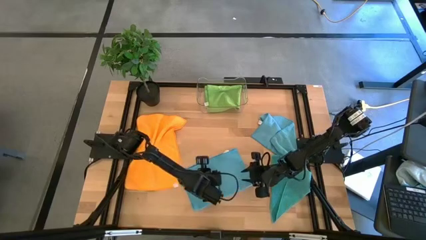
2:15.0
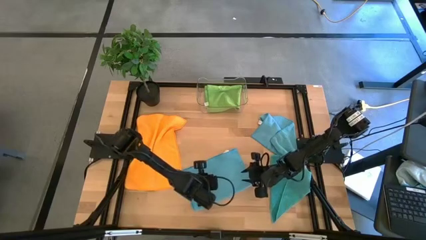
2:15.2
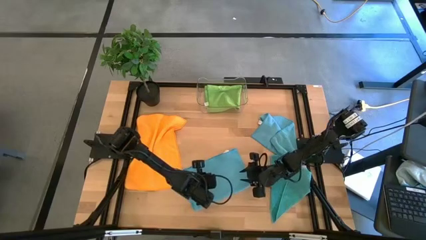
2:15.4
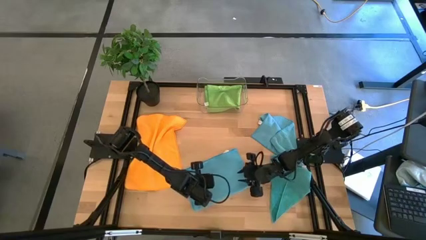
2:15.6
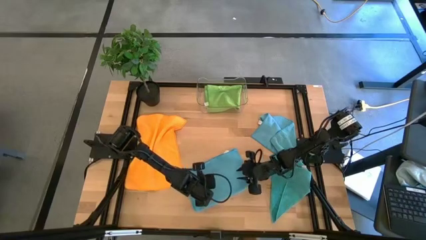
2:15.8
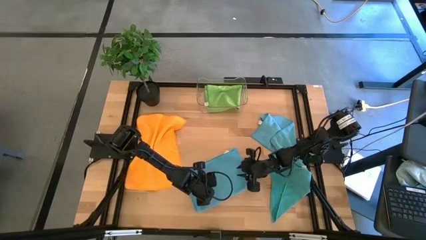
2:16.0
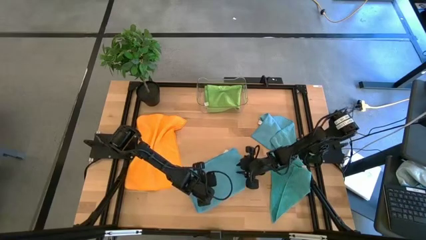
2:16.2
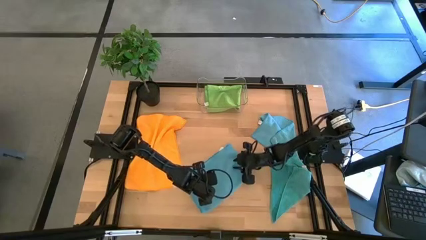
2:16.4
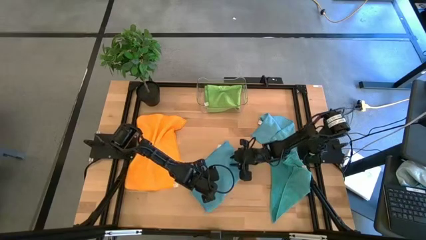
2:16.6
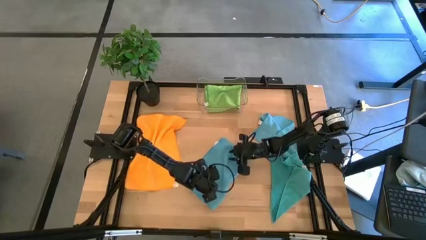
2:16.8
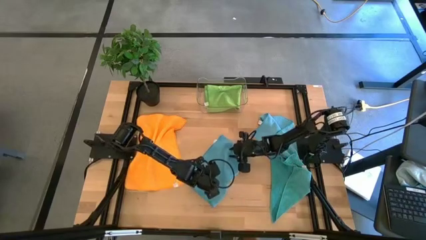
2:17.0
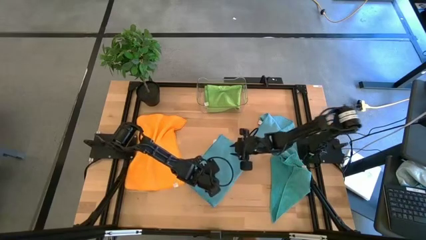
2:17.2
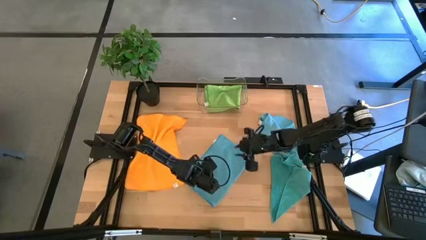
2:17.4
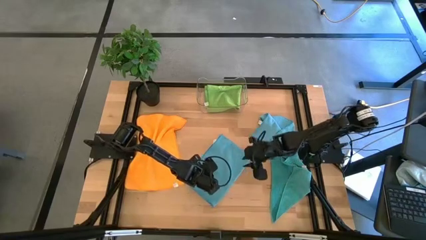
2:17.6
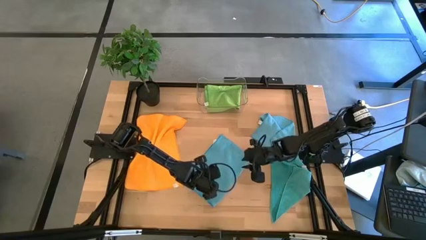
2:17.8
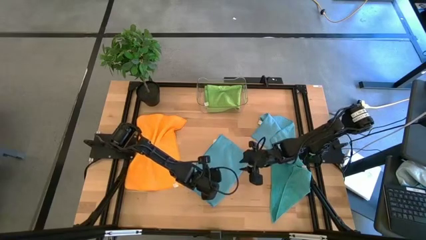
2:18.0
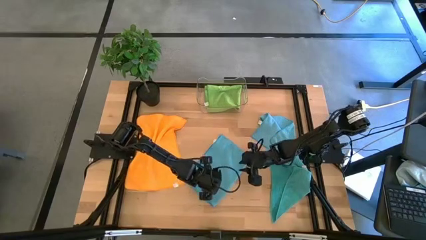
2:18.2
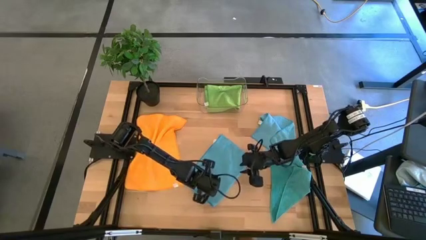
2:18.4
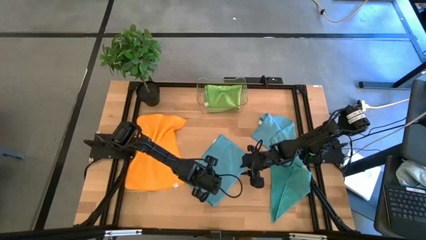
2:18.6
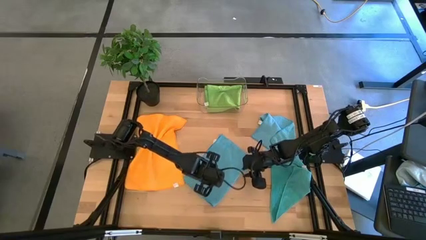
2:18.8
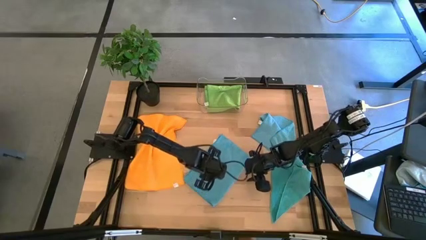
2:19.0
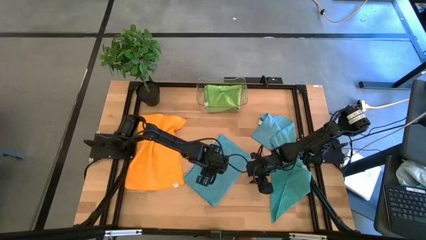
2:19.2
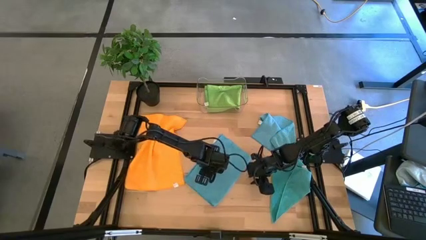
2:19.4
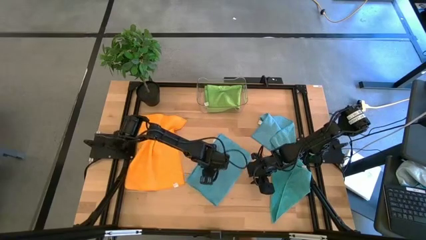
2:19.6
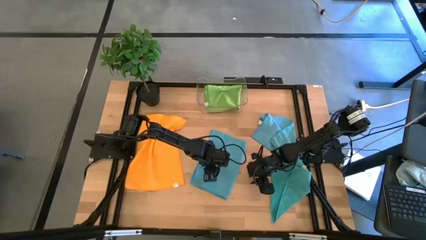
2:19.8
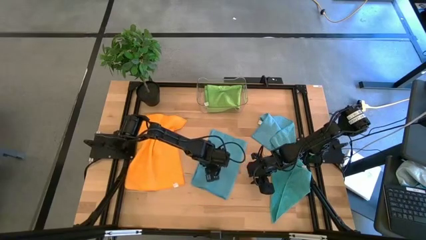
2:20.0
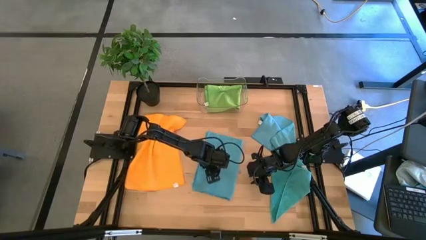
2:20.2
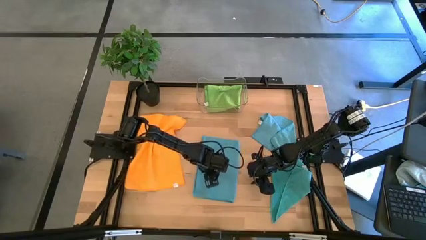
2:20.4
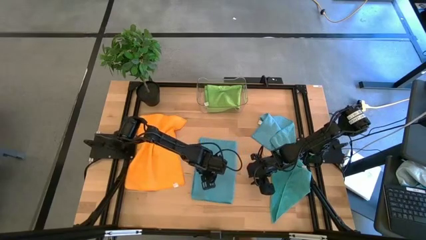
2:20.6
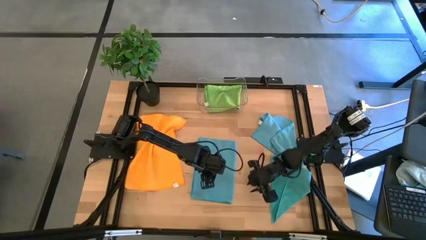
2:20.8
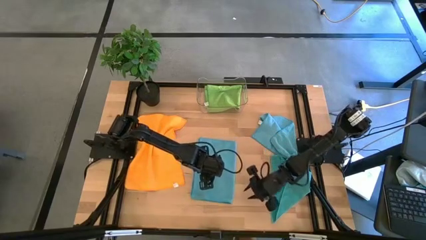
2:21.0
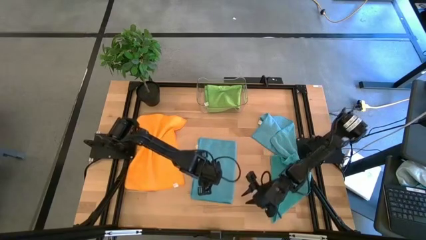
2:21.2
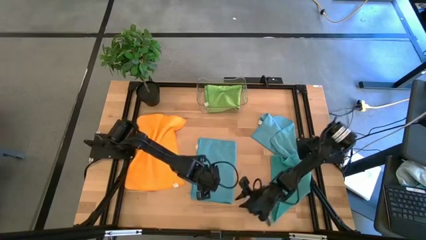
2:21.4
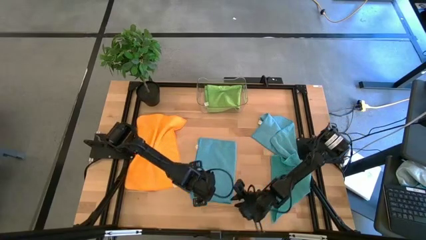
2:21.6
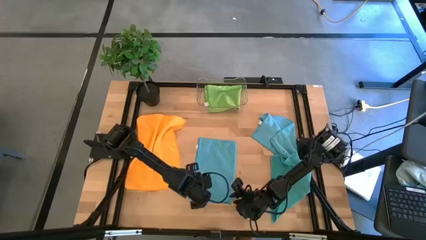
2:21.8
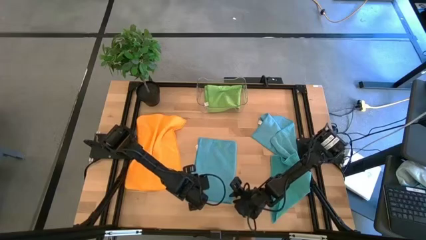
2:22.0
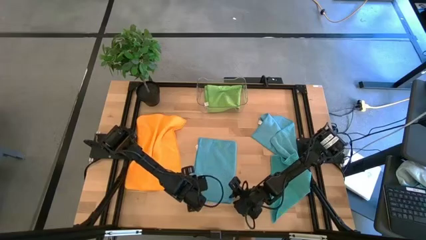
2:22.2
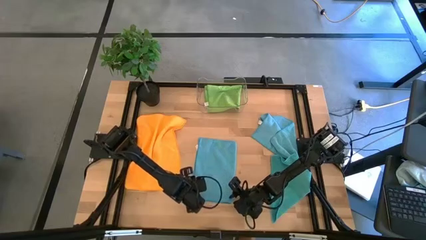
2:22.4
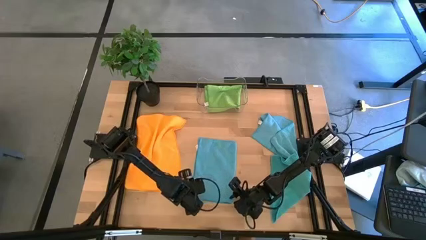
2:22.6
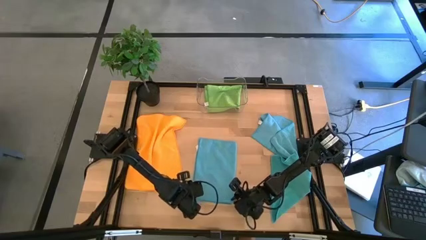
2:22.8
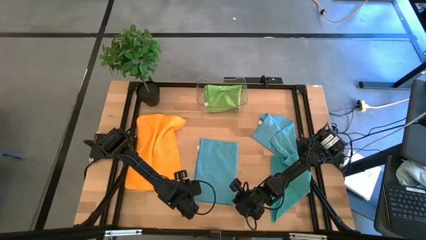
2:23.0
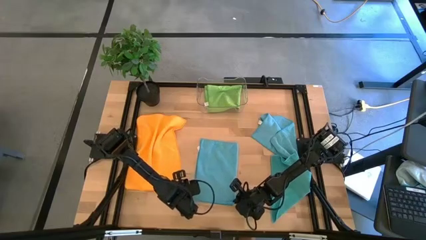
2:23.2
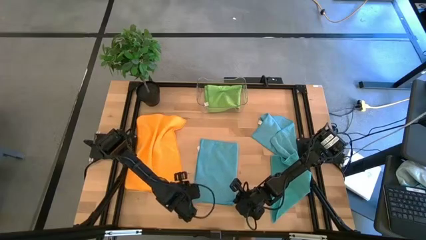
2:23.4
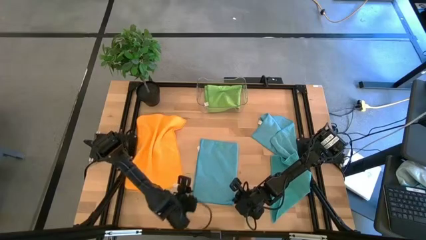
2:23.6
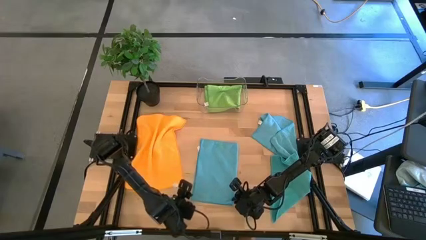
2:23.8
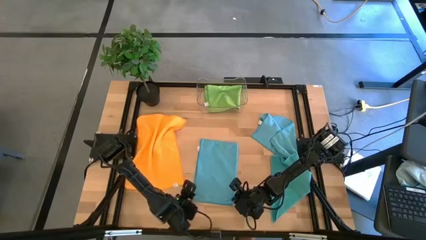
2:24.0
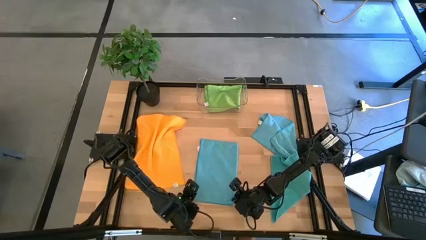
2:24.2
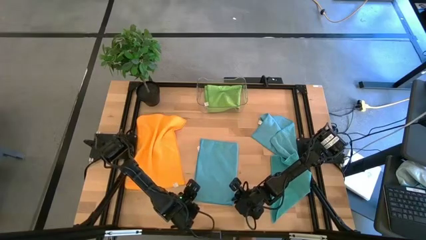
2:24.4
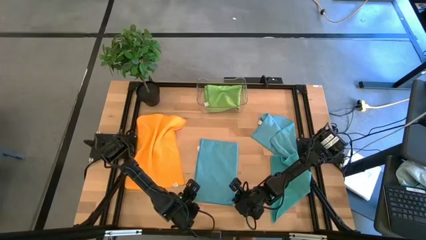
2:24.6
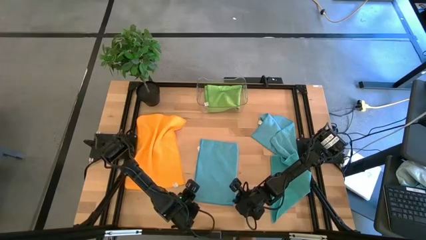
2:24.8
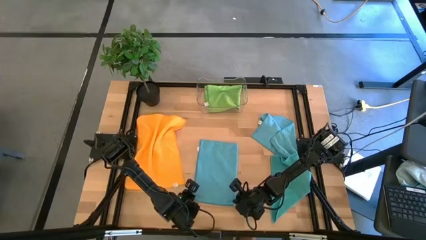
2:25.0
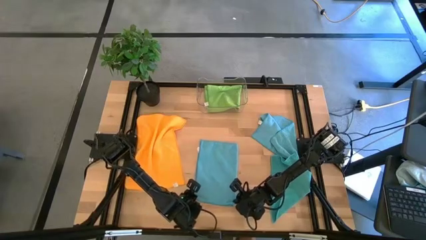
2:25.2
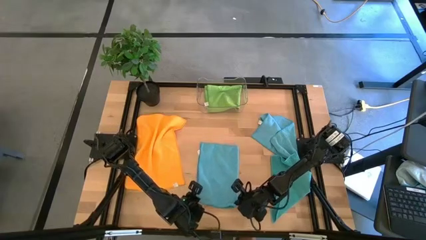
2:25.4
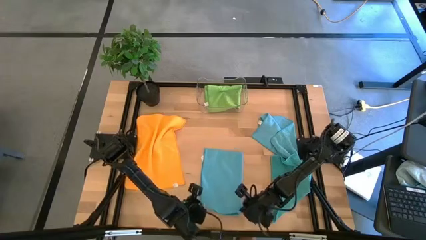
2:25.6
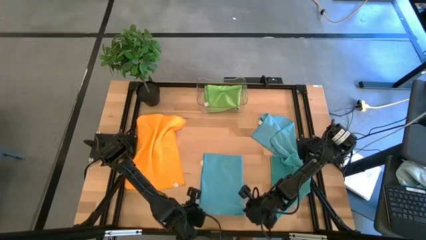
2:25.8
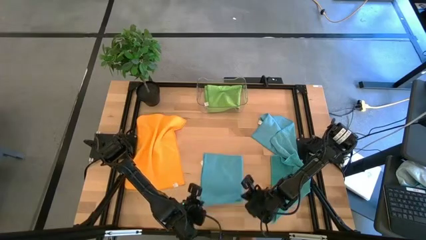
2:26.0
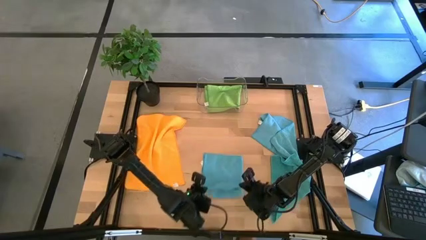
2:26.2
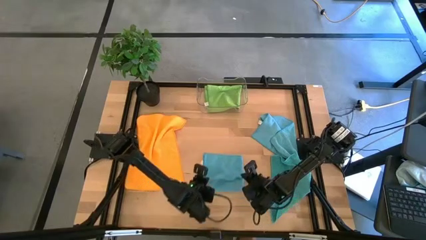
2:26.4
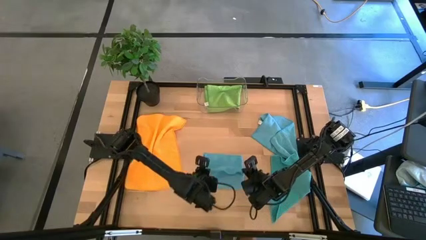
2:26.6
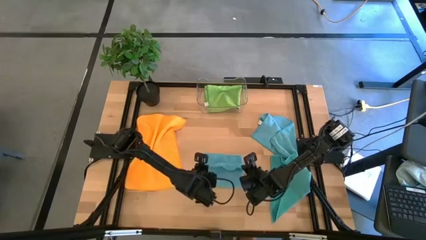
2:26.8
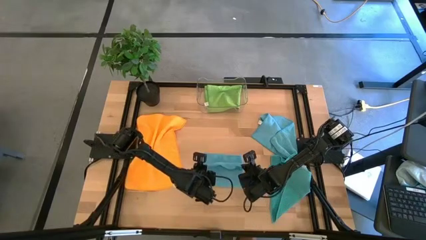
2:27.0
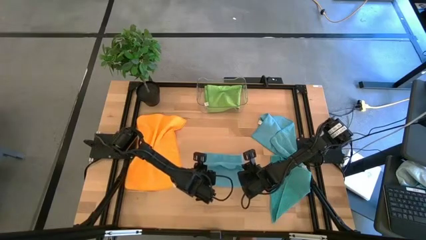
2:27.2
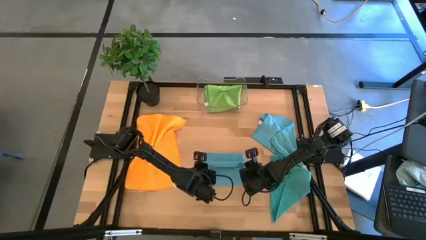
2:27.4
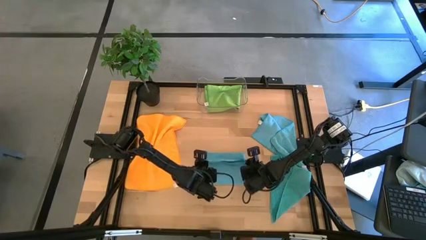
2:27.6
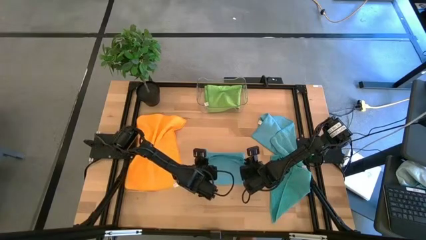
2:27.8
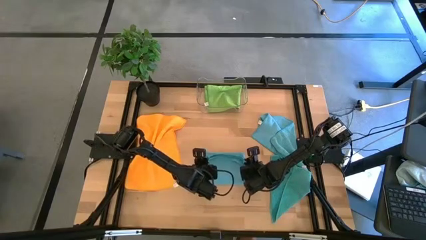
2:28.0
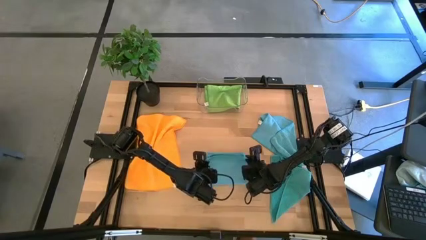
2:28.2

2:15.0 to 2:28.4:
Task: Fold microfiber towels
Fold the top left blue microfiber towel
